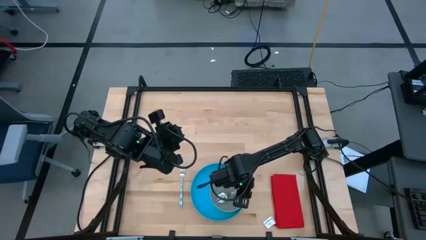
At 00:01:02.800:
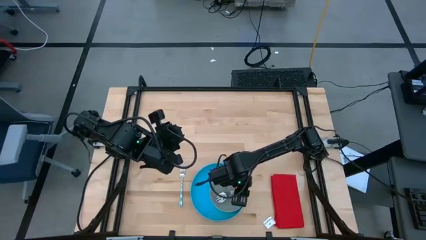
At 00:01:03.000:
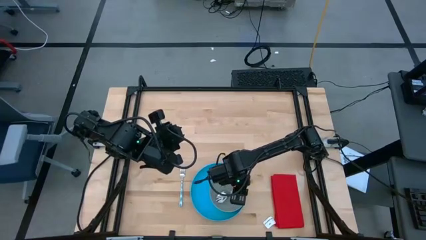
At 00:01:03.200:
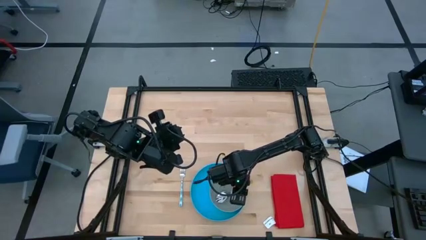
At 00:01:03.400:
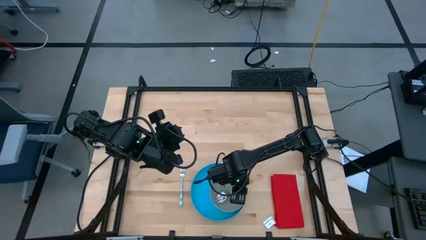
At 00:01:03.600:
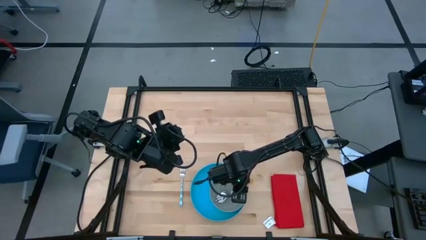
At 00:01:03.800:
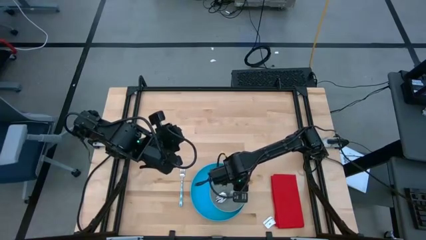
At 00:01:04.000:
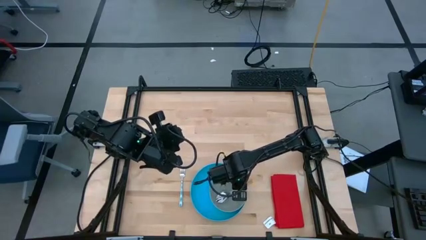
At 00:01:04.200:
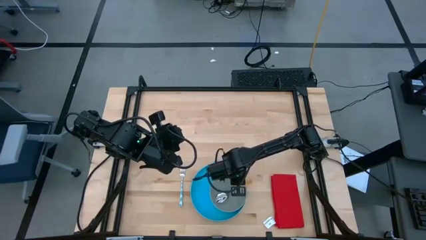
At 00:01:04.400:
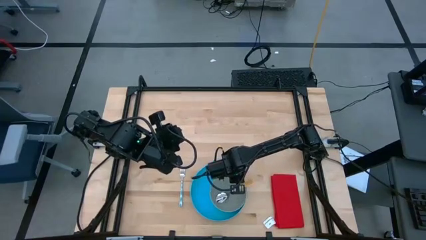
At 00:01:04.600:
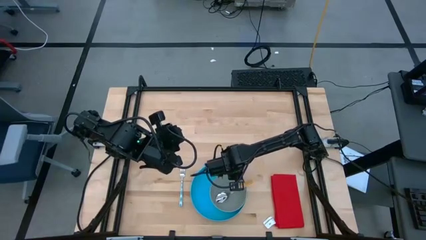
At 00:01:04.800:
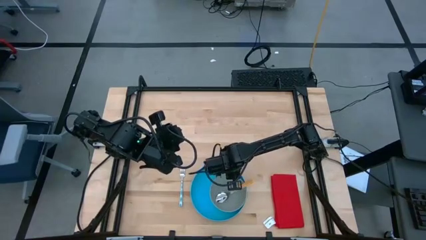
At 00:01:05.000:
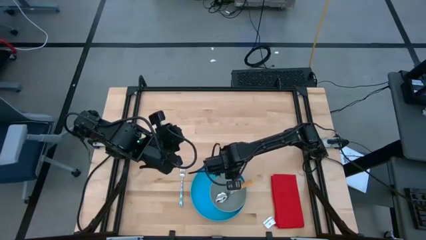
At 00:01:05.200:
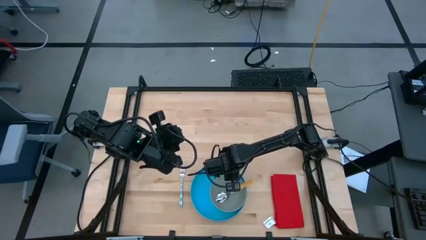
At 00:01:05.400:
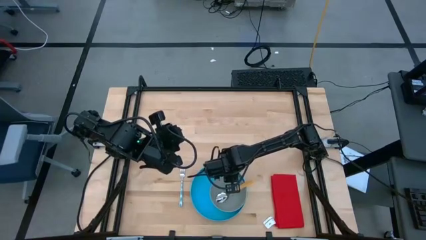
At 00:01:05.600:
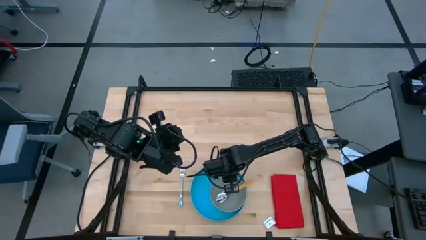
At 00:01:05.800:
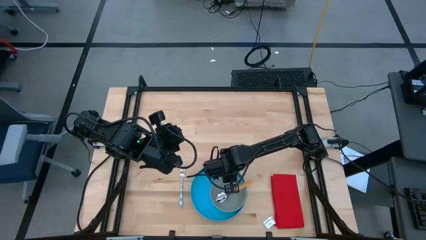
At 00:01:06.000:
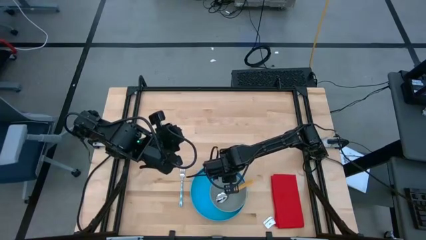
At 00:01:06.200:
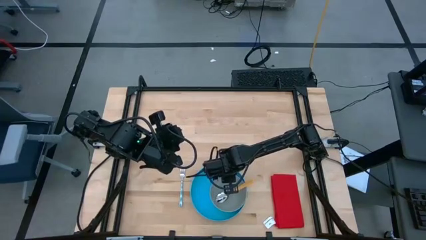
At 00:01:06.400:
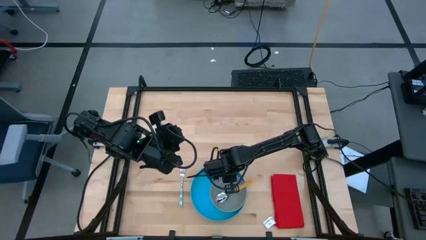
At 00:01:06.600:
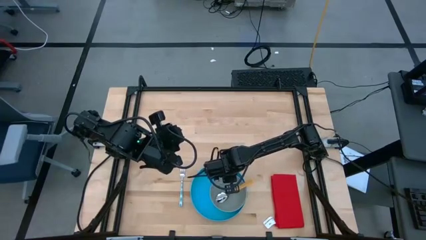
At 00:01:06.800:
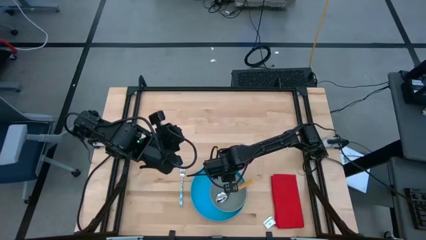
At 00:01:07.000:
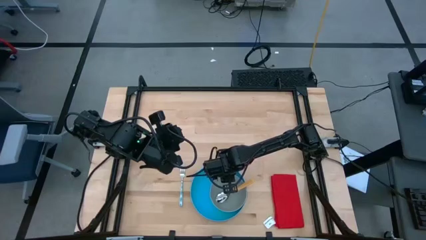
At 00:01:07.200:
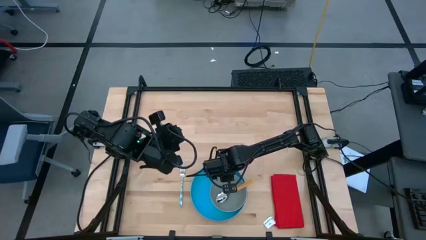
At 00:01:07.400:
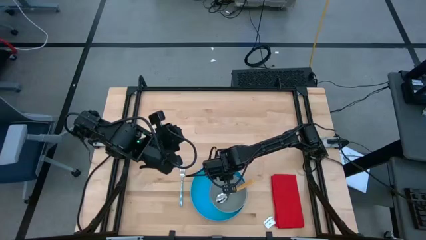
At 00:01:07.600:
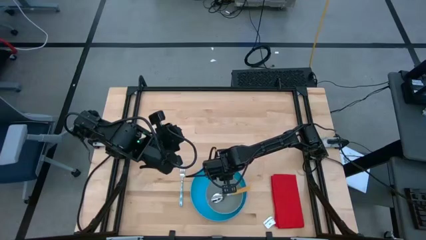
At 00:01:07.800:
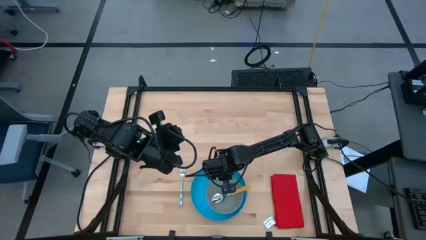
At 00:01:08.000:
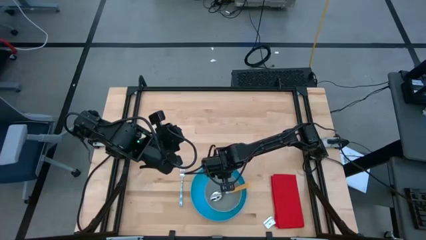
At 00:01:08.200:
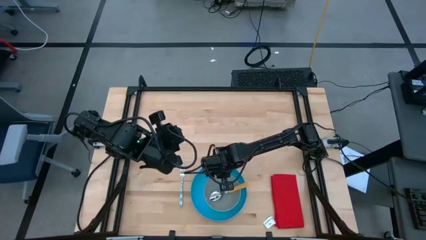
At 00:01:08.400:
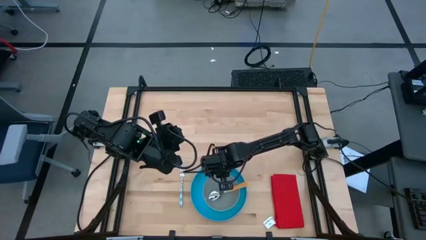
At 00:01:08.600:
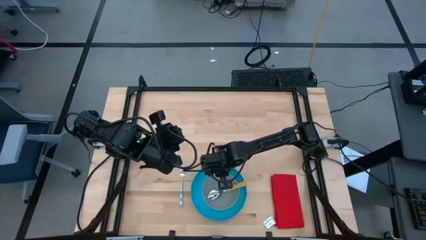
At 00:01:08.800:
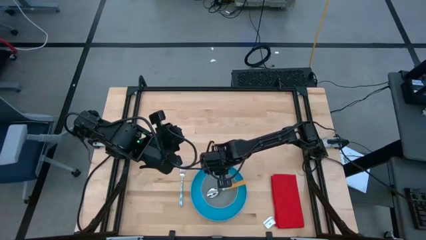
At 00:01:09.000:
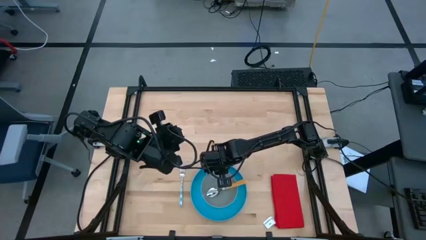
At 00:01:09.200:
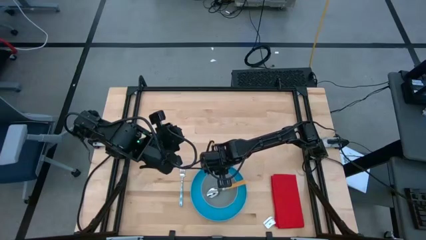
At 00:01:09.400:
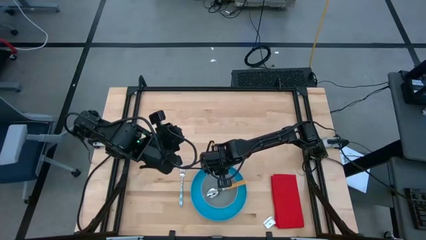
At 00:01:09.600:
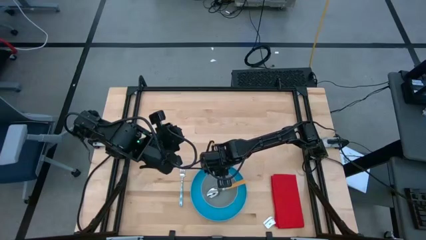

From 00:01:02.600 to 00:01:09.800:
Task: Pick and place plate/cup/fork/spoon on tray
Adjust the gray bowl

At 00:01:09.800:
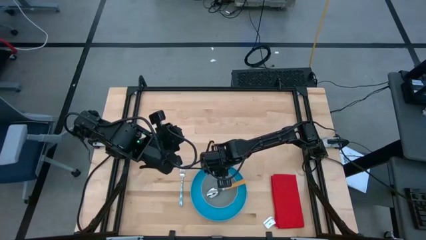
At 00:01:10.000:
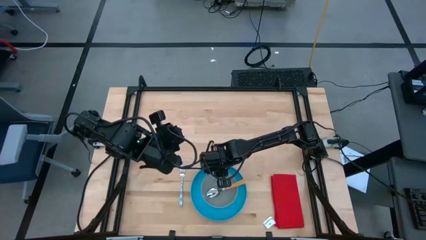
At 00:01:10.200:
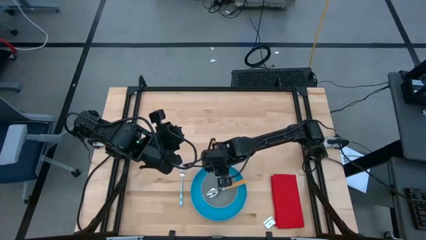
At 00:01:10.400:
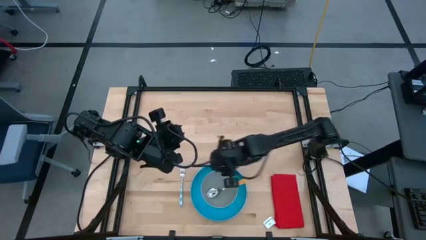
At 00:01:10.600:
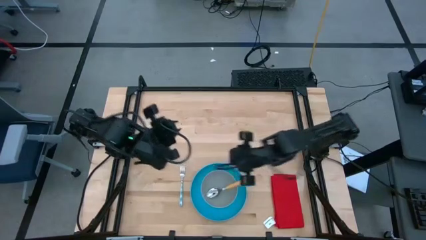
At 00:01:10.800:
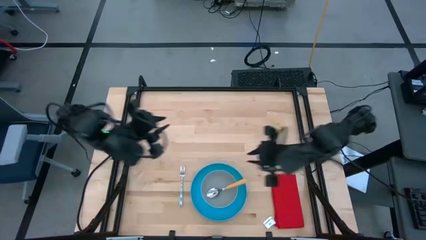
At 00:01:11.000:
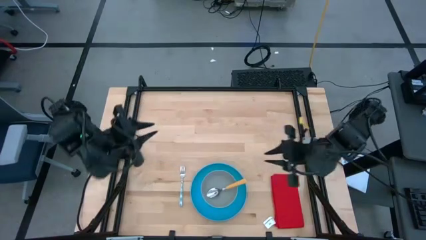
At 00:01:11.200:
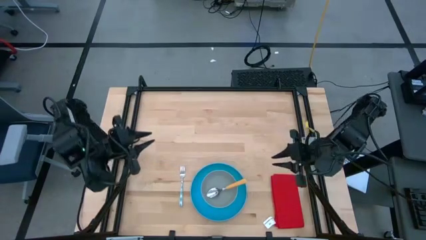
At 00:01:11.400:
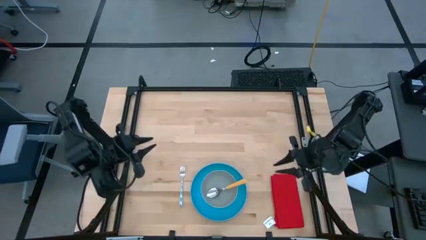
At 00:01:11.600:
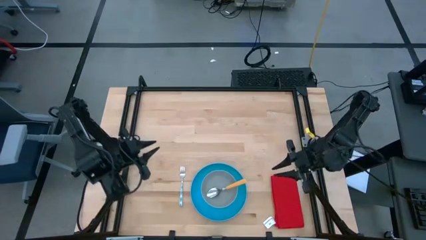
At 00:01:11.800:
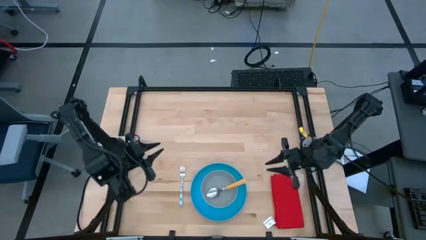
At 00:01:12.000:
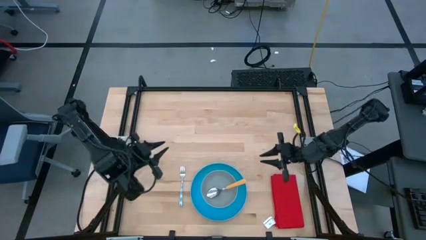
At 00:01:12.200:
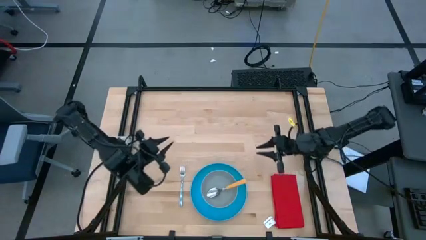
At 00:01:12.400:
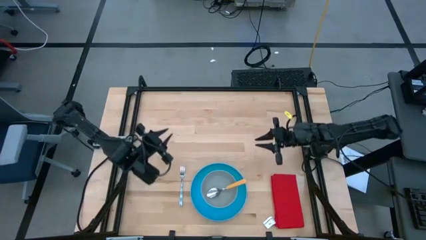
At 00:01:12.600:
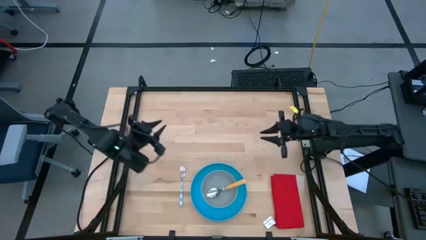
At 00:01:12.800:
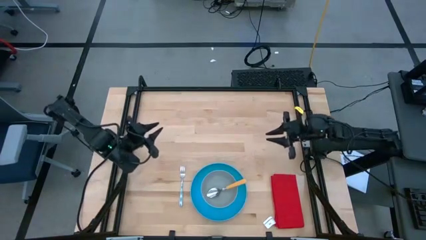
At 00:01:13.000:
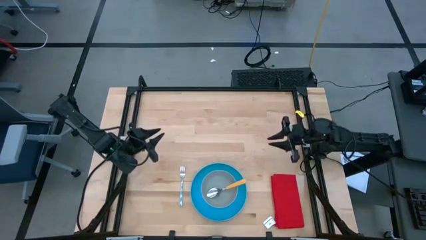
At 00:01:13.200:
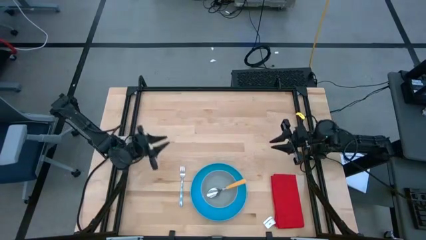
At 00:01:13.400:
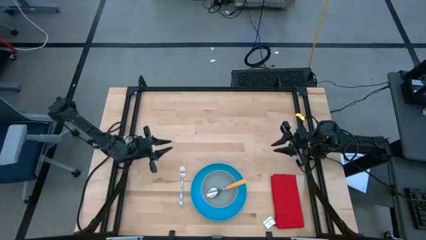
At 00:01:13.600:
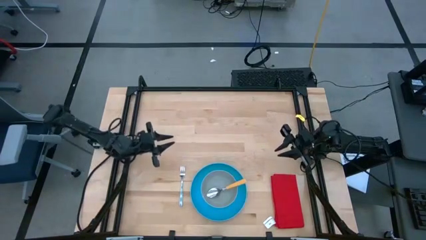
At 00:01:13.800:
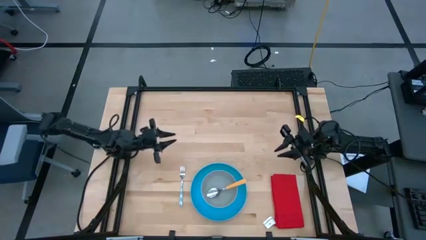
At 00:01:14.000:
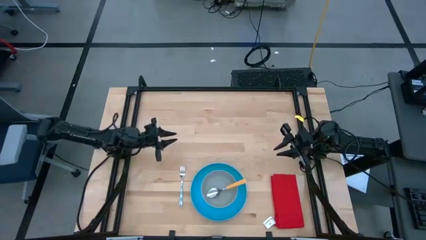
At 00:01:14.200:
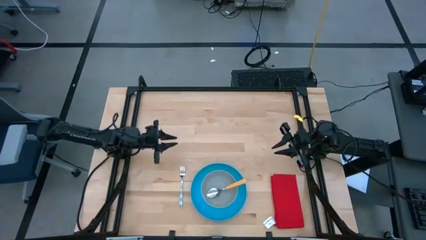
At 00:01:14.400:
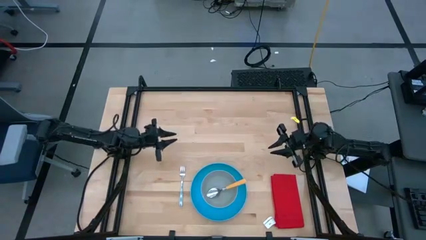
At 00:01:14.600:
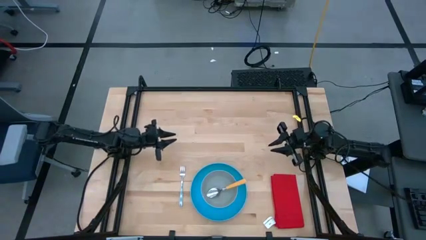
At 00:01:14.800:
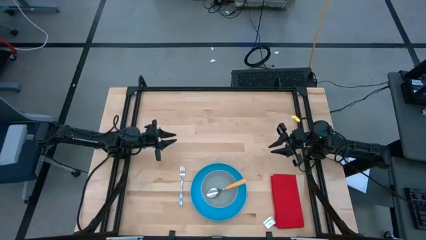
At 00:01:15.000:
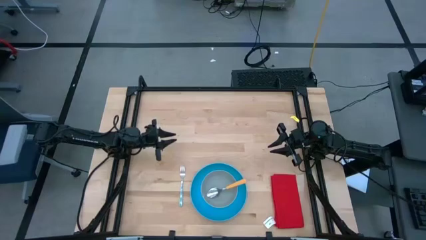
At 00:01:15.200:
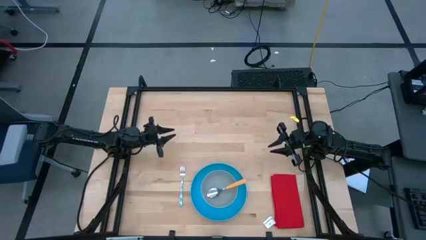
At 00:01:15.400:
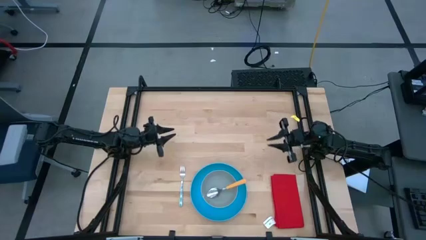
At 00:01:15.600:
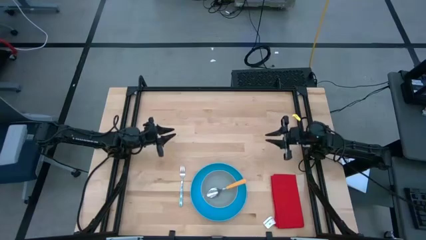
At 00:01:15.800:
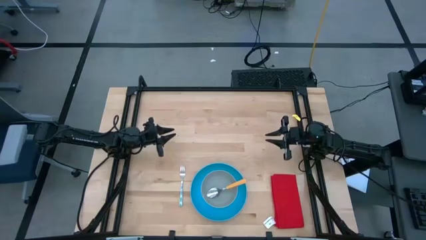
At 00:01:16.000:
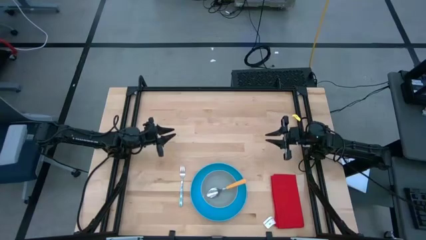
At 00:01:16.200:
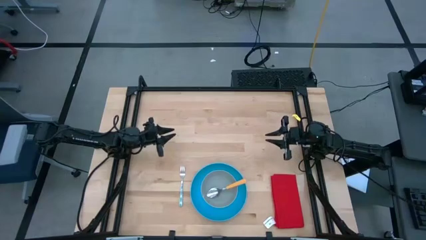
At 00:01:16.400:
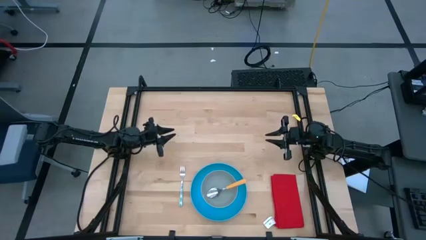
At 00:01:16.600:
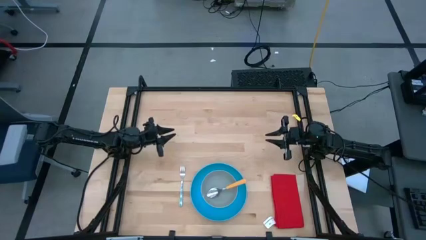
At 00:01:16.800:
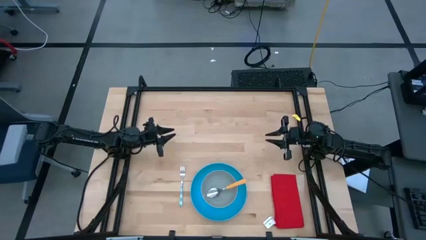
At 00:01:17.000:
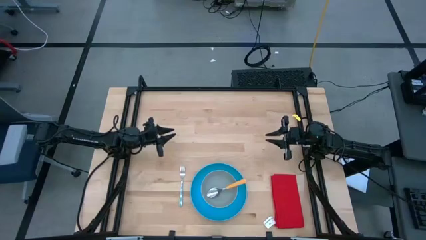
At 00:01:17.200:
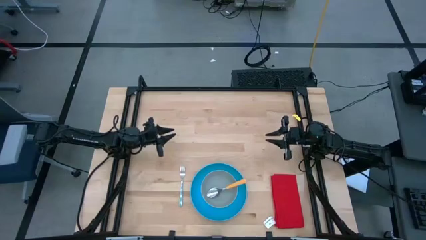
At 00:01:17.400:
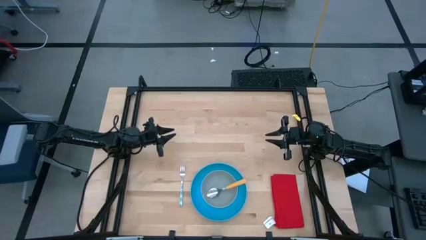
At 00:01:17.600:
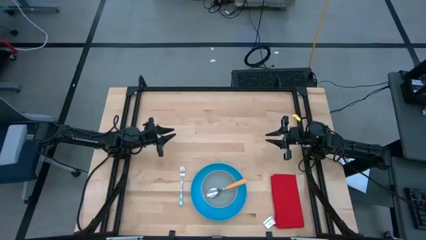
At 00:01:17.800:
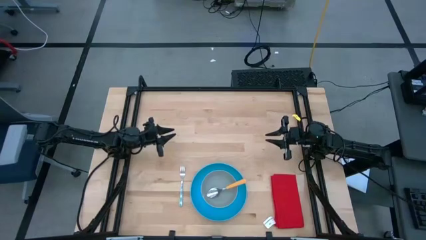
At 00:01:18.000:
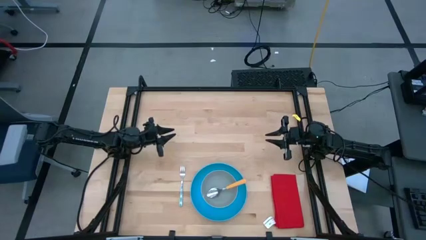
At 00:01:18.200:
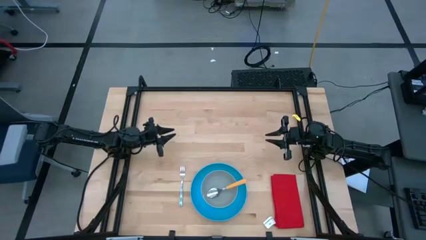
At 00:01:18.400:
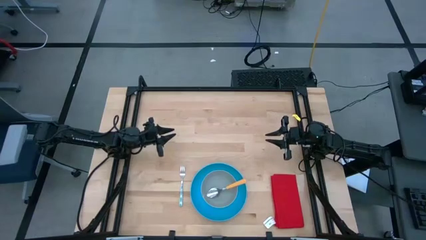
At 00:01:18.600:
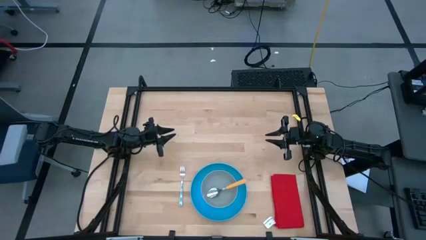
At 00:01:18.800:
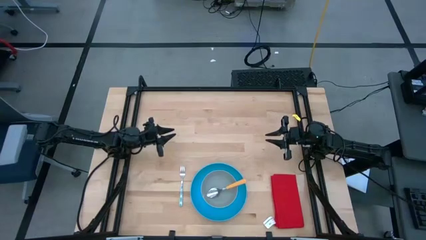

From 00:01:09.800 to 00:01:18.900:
Return to Home Position
